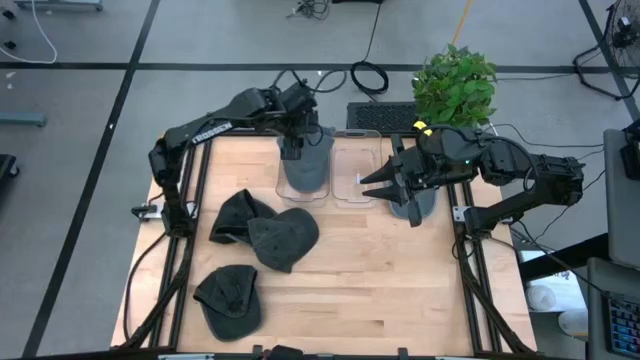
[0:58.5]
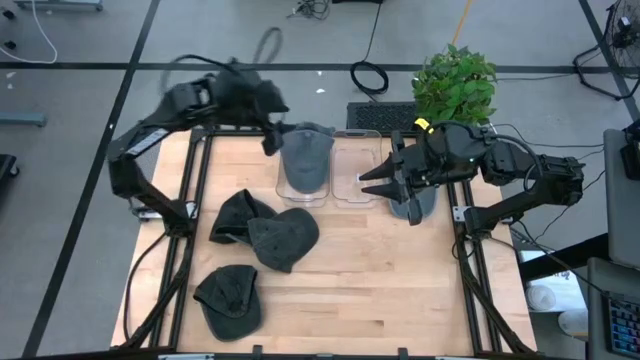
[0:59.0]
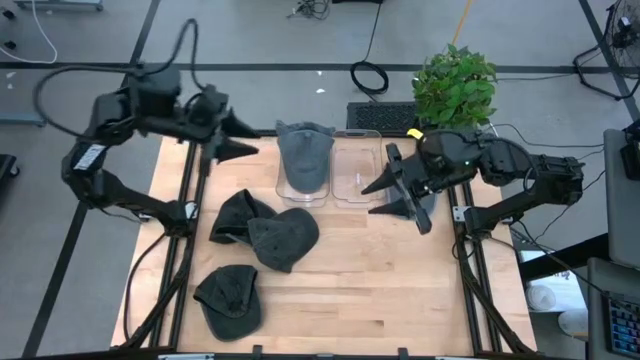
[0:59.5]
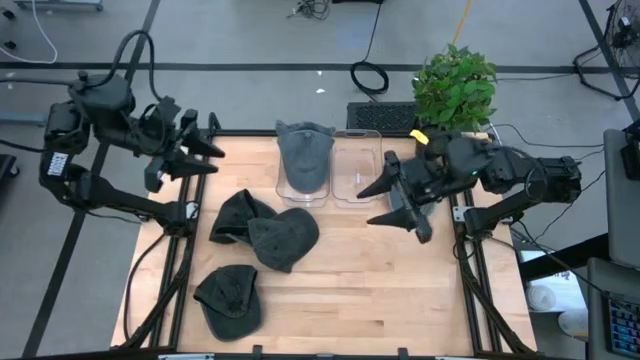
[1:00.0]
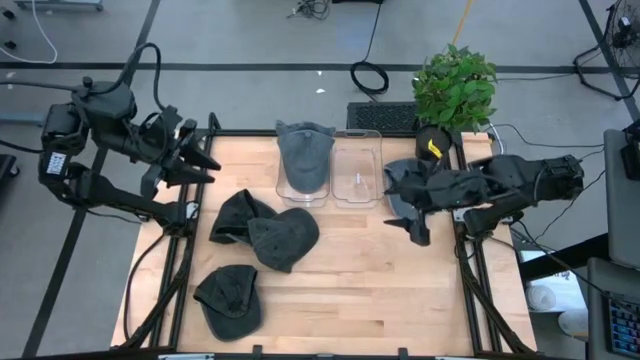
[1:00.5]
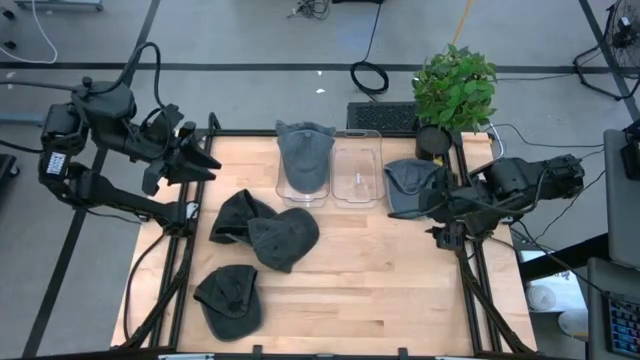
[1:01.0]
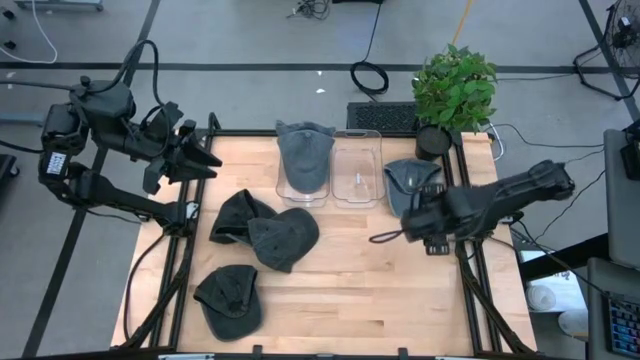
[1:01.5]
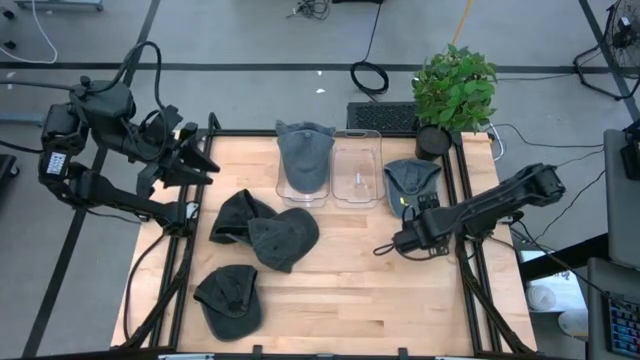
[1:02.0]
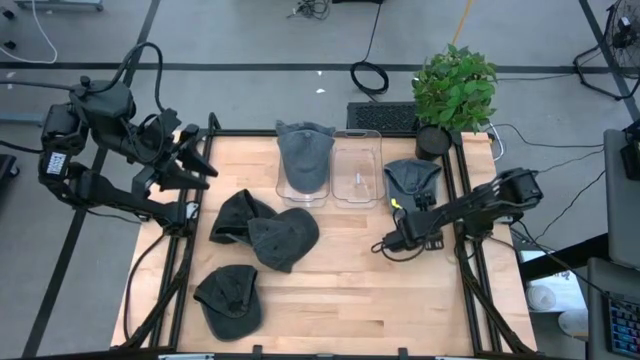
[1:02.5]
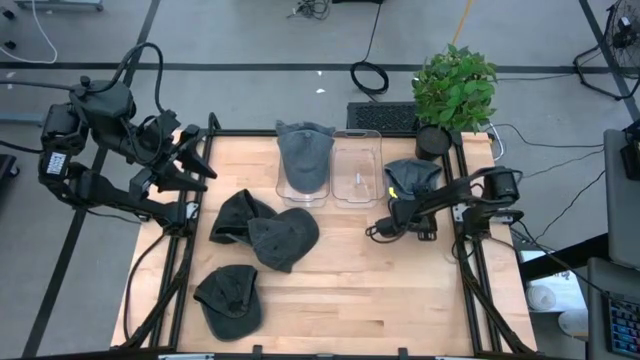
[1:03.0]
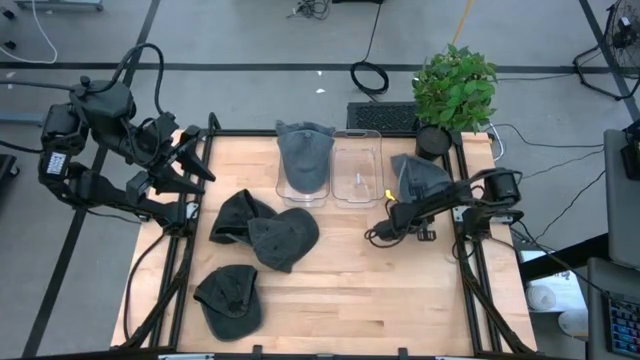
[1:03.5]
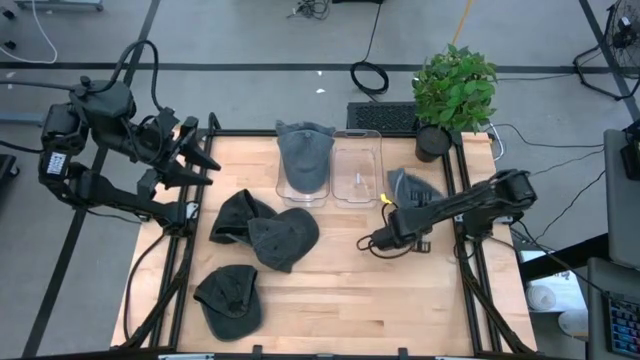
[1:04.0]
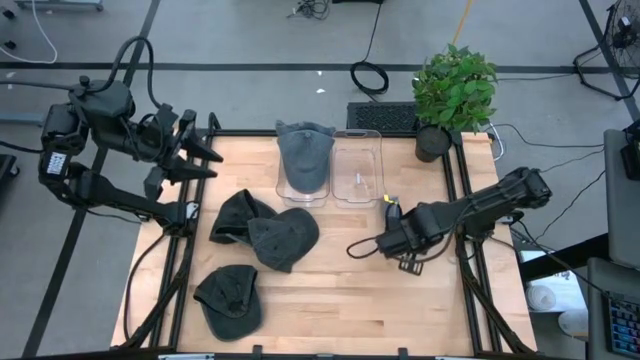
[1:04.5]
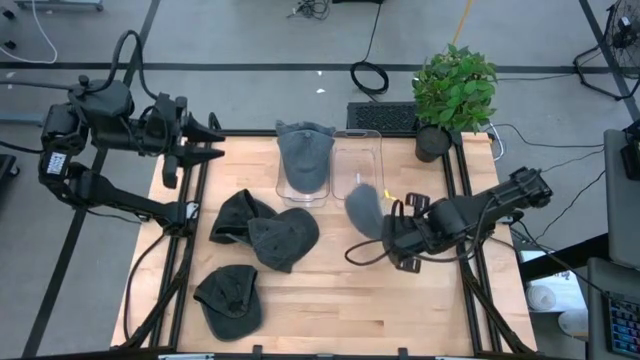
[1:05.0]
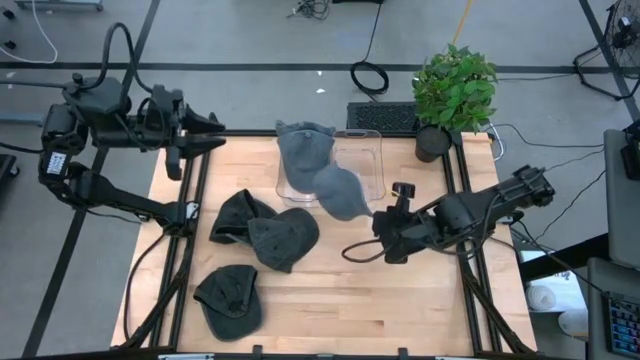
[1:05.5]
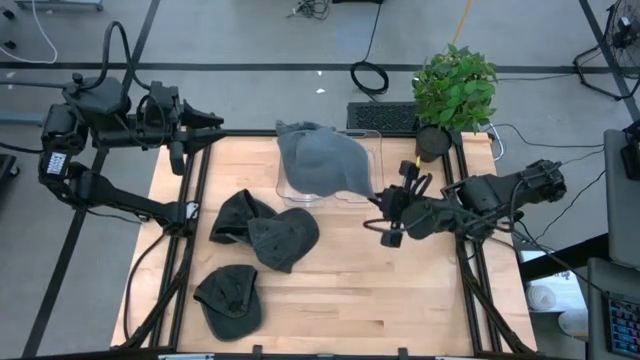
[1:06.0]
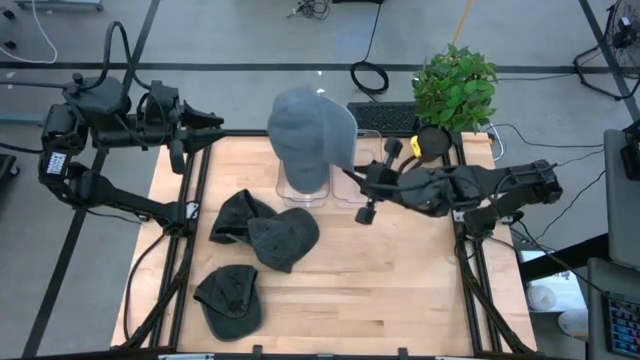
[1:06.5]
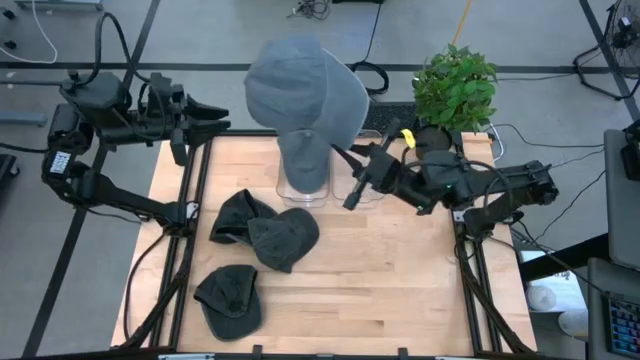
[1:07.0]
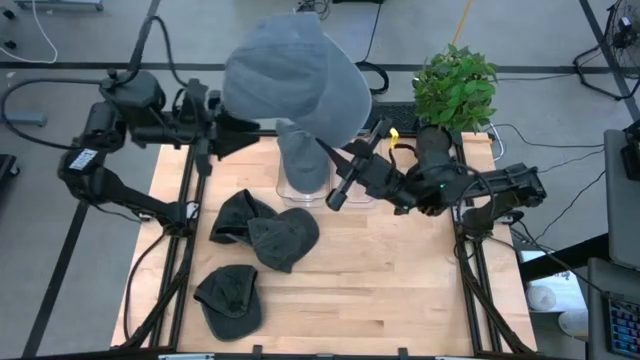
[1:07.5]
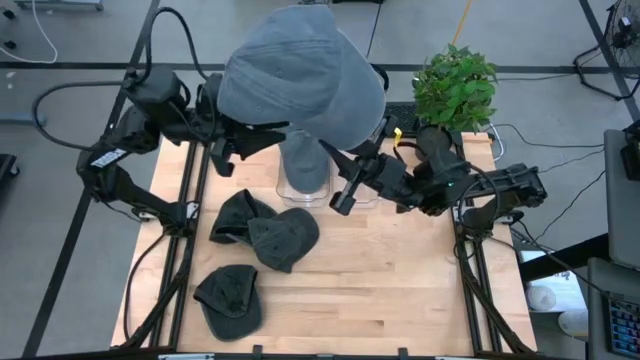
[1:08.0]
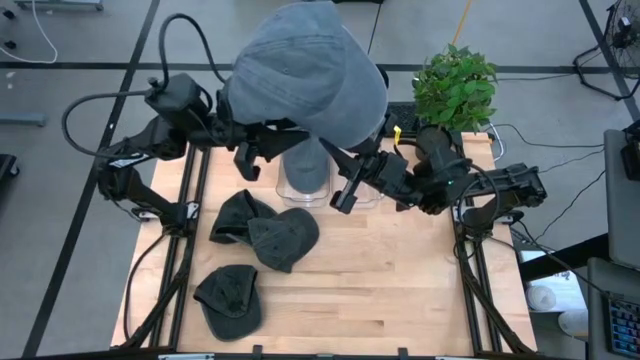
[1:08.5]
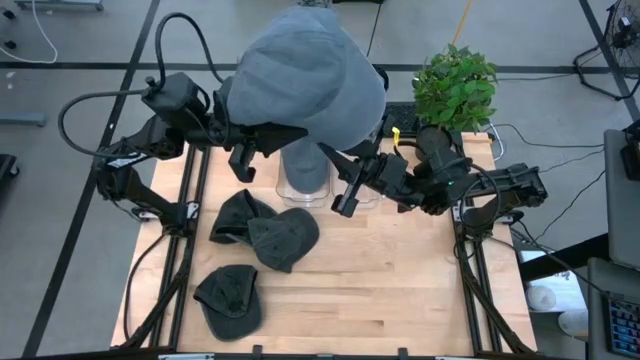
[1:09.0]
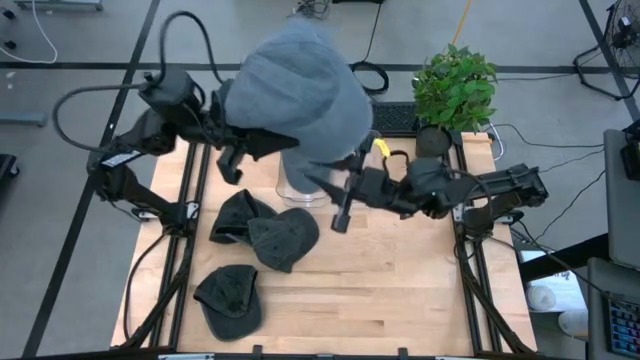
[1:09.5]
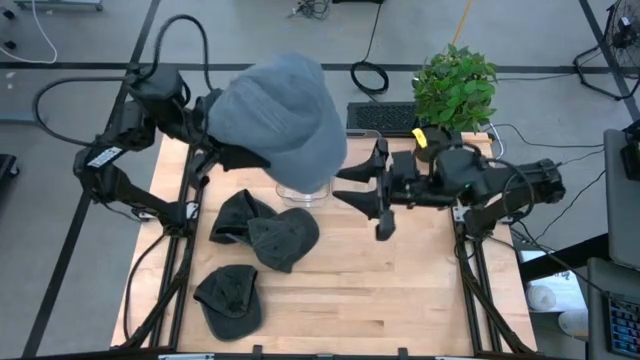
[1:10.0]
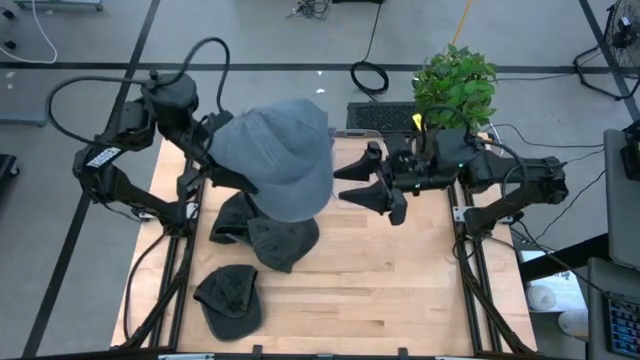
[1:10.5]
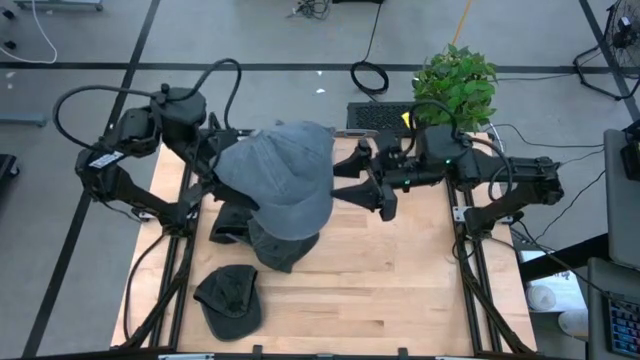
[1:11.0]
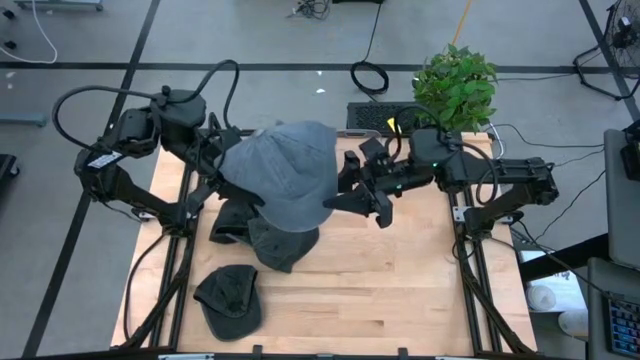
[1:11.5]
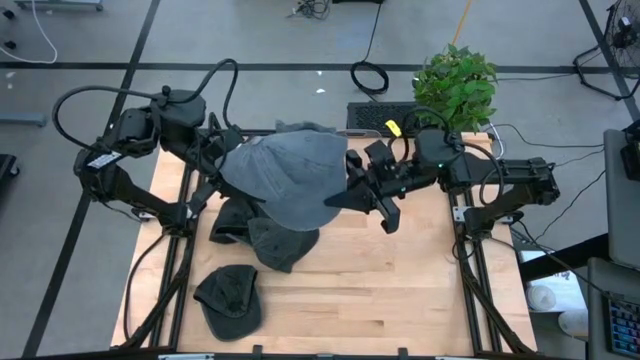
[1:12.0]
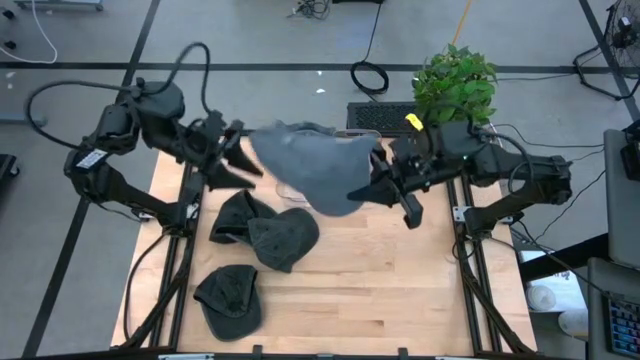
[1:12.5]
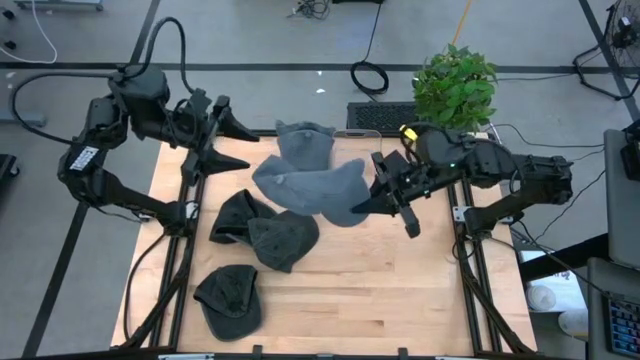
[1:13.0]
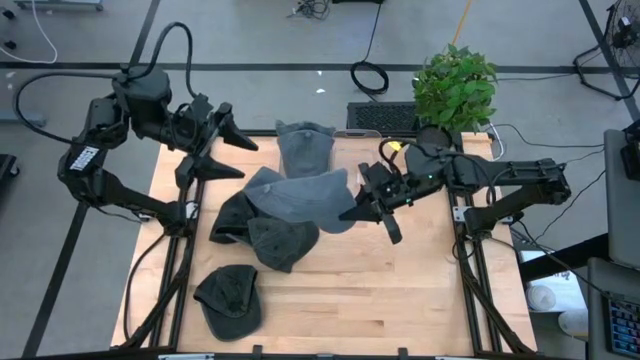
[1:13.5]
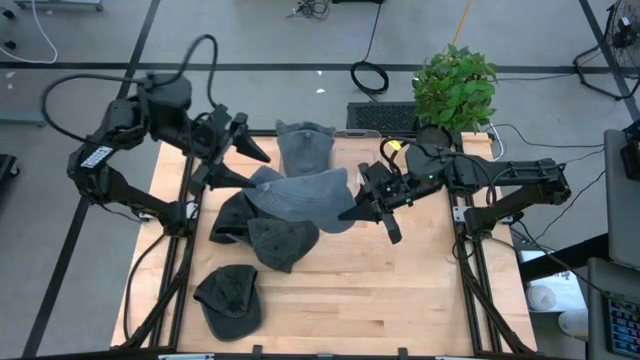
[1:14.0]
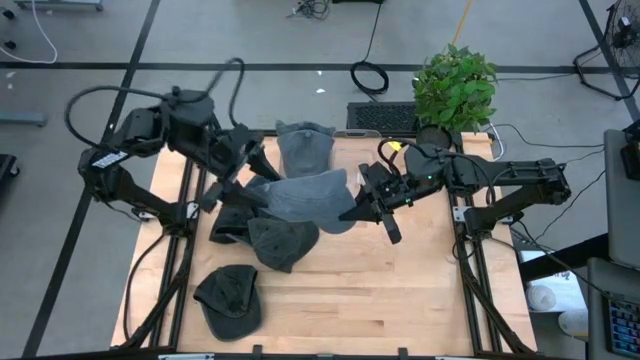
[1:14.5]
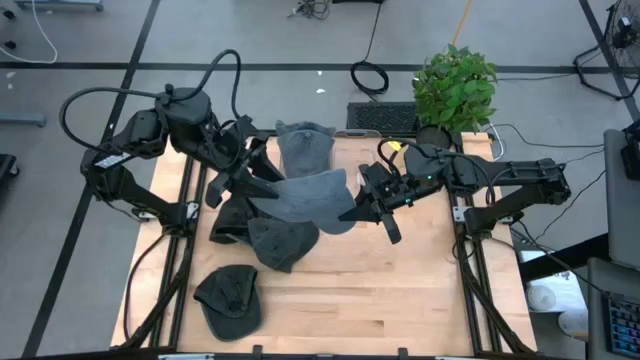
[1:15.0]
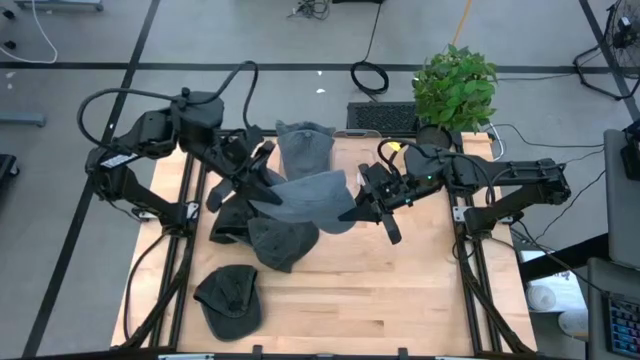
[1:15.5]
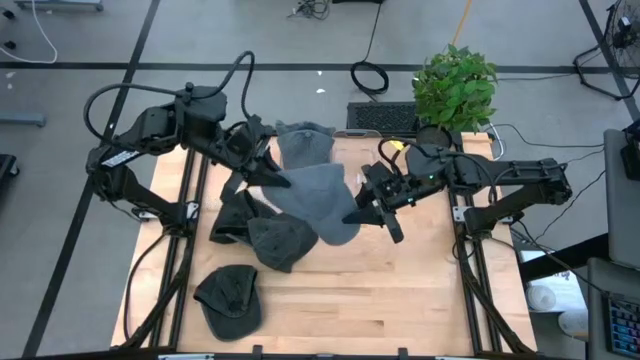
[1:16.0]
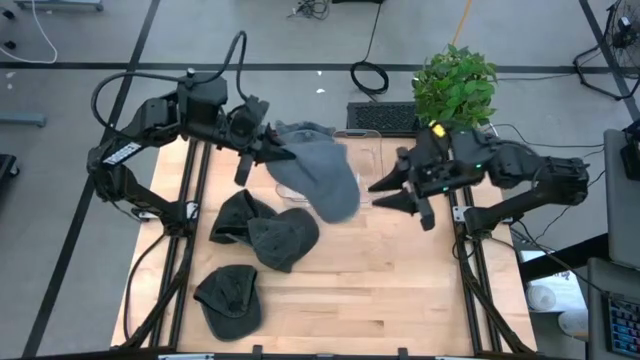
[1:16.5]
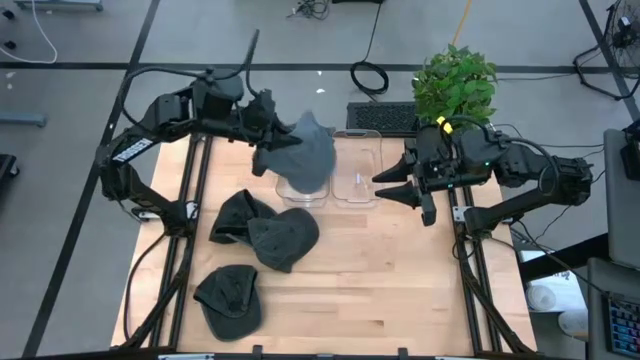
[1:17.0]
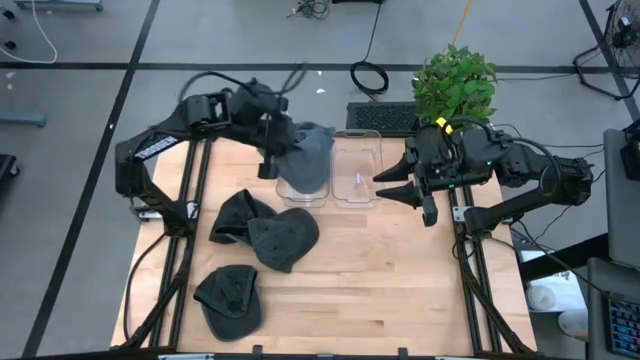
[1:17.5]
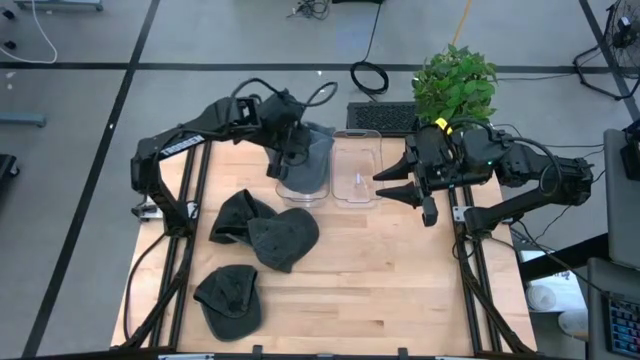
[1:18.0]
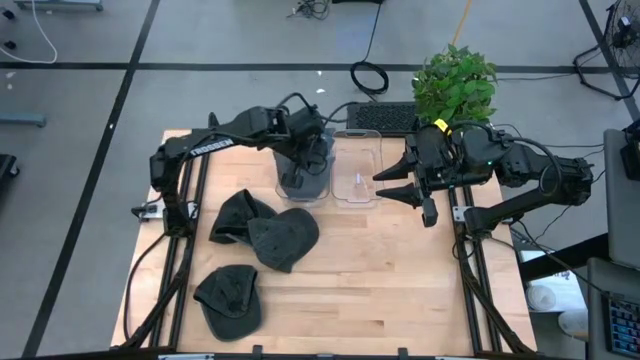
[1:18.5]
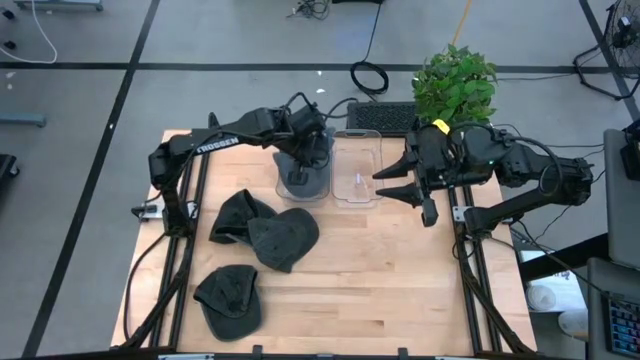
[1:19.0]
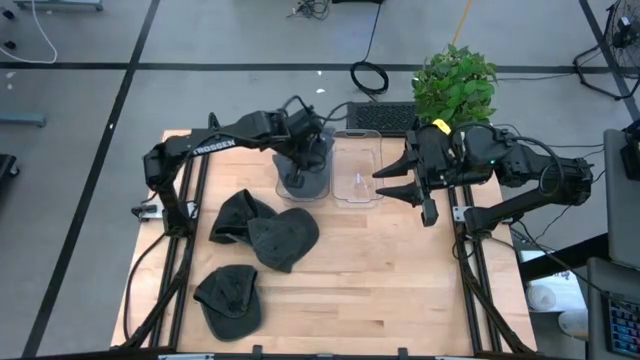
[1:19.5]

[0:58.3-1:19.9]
Task: Pick & Place hat
Put the gray cap into the left transparent bin
